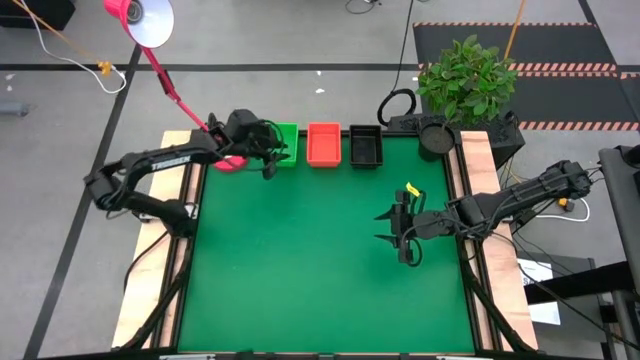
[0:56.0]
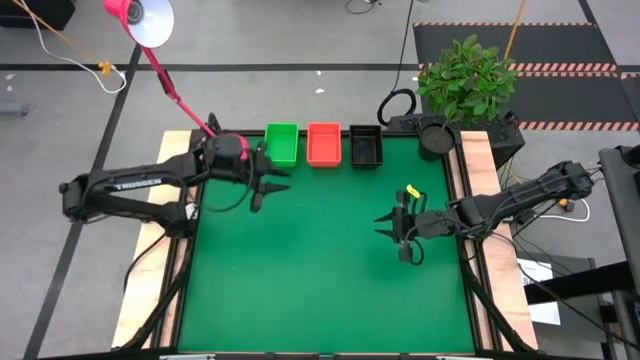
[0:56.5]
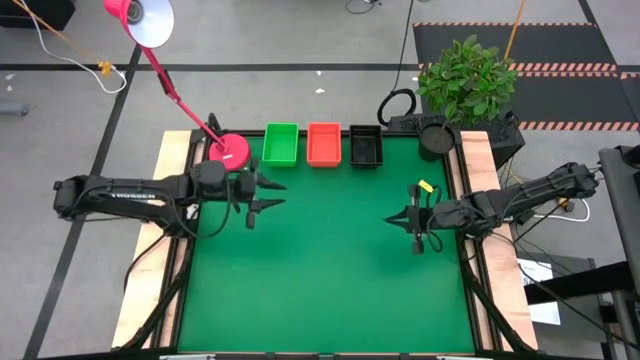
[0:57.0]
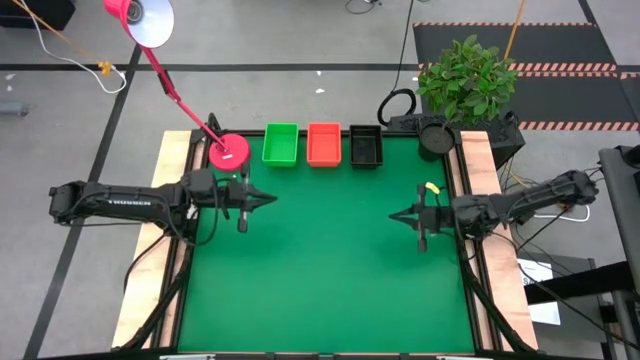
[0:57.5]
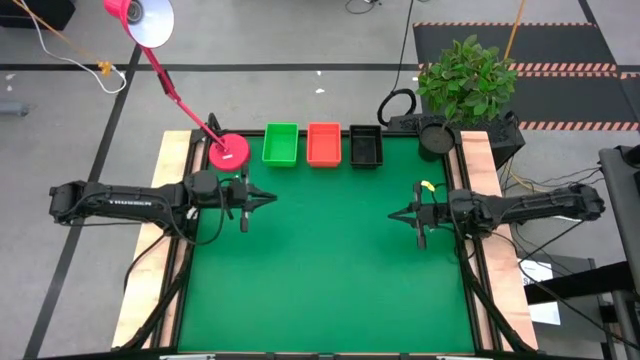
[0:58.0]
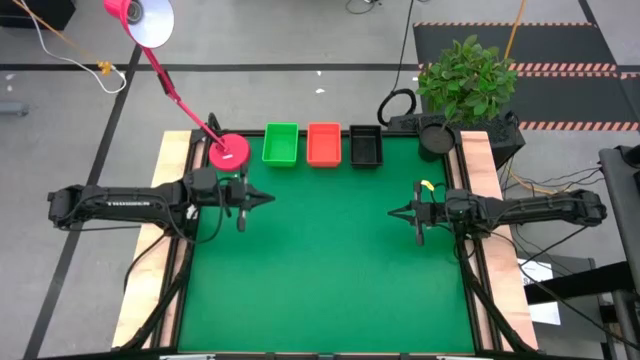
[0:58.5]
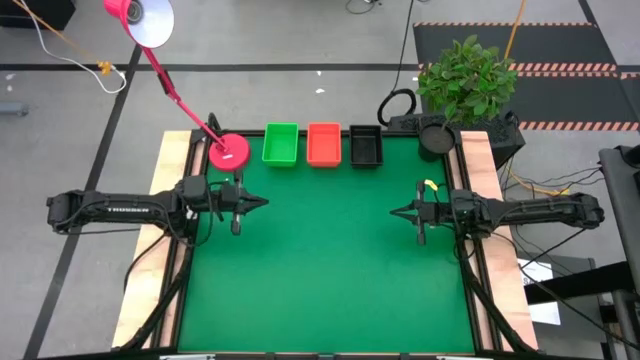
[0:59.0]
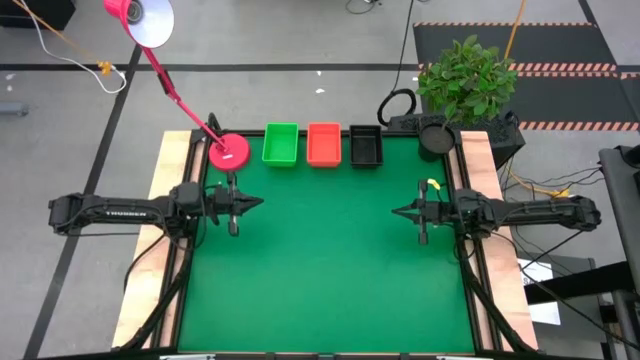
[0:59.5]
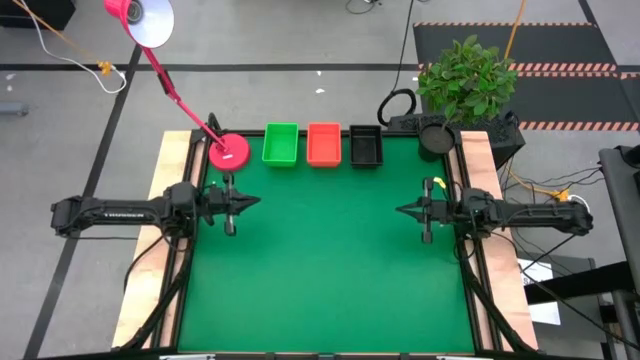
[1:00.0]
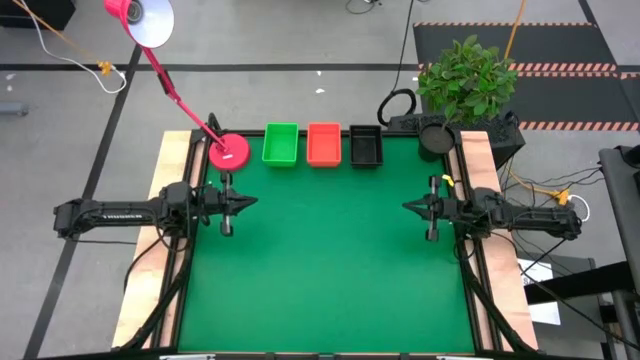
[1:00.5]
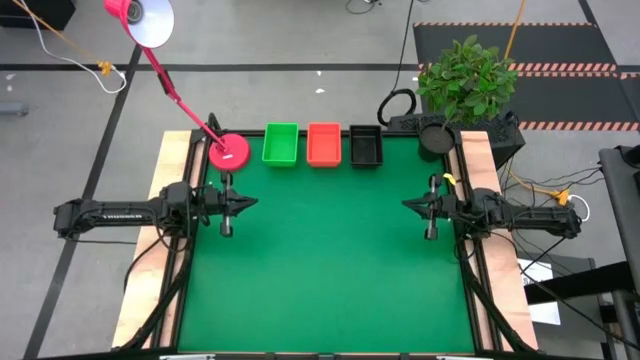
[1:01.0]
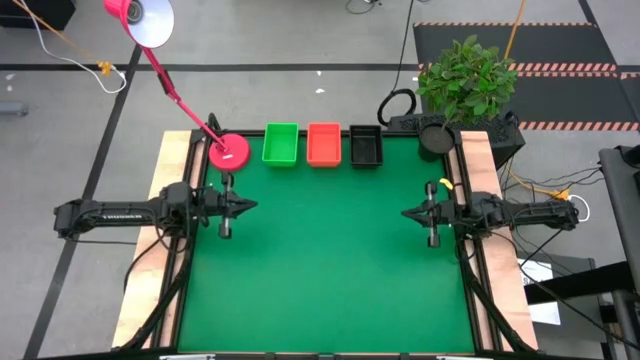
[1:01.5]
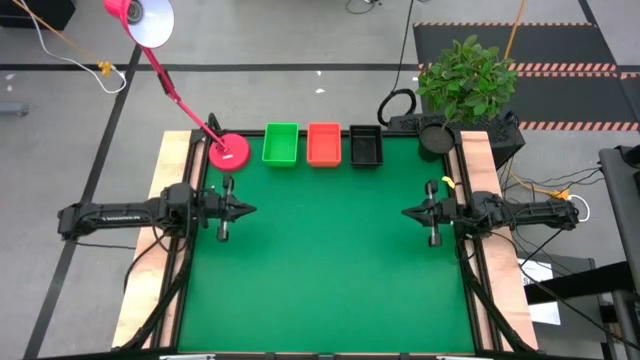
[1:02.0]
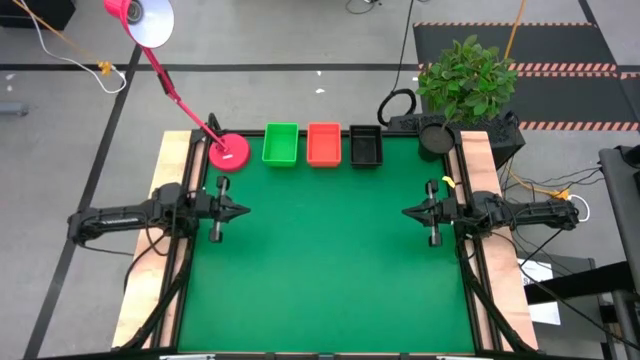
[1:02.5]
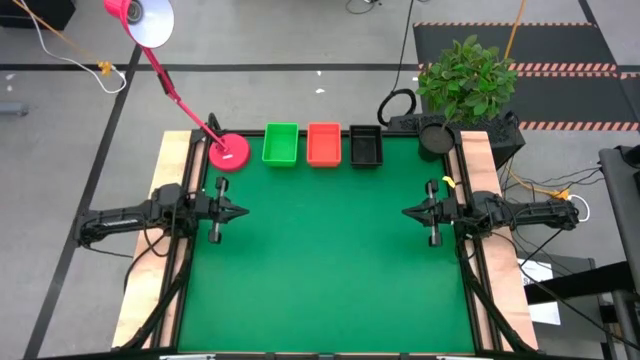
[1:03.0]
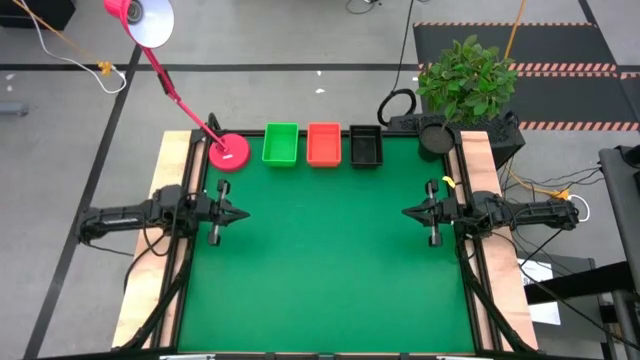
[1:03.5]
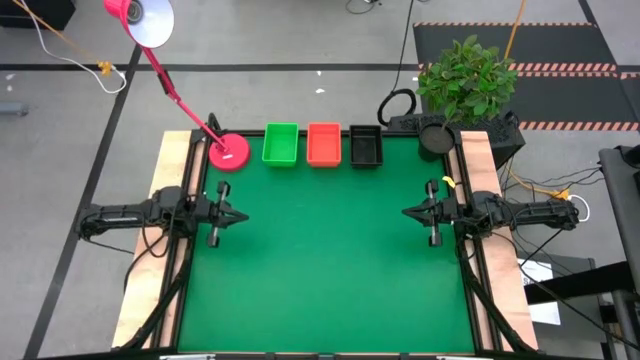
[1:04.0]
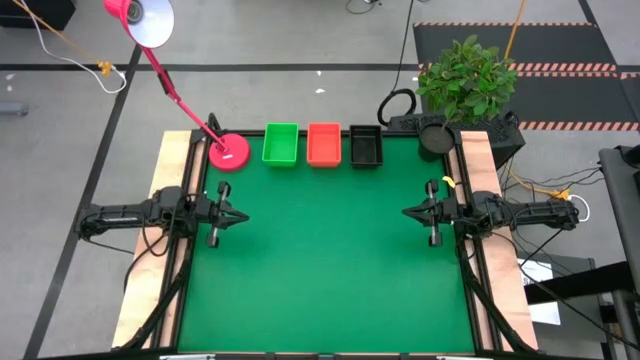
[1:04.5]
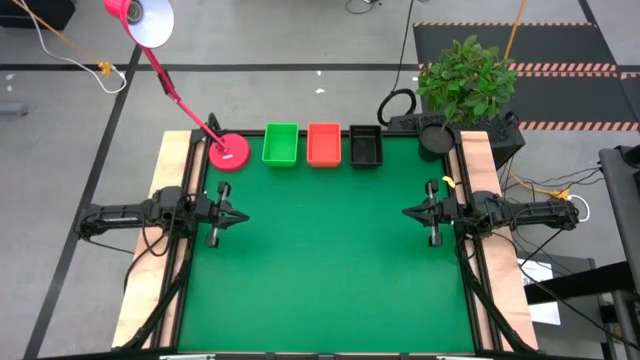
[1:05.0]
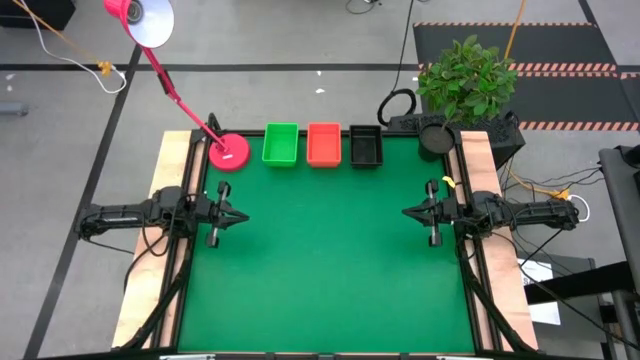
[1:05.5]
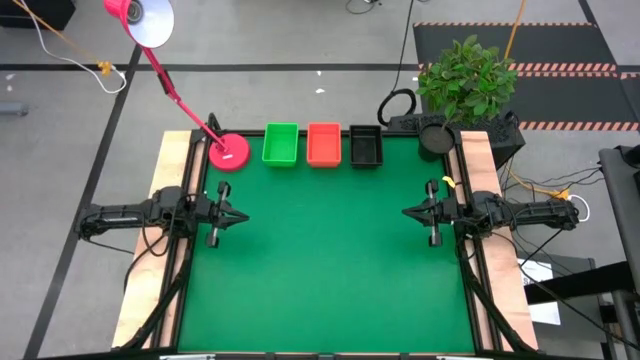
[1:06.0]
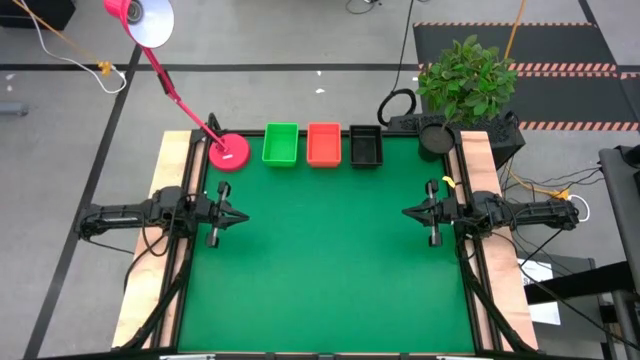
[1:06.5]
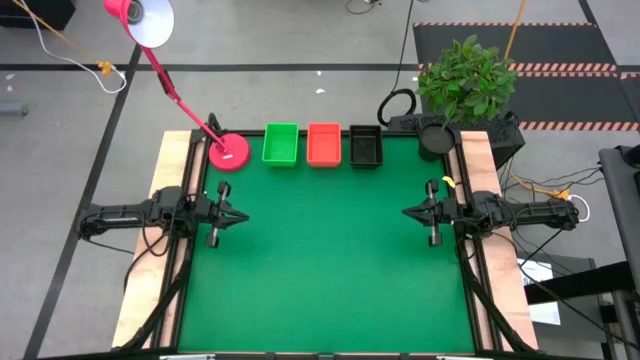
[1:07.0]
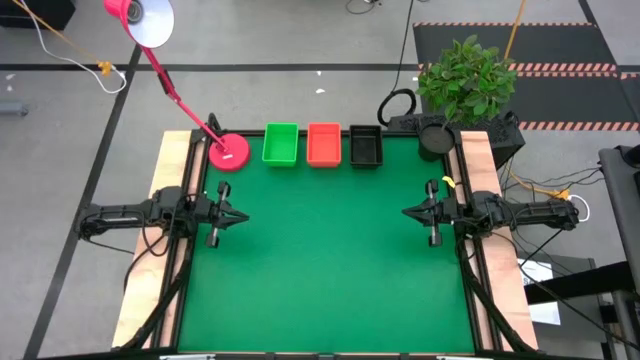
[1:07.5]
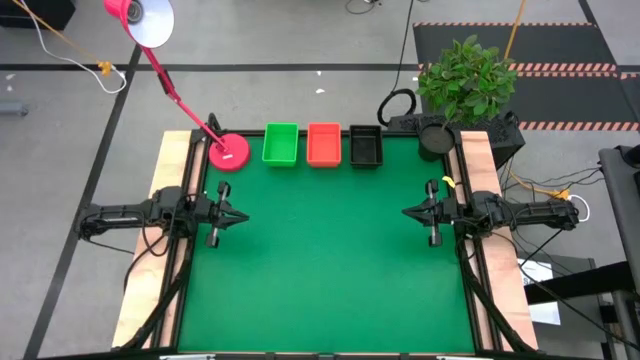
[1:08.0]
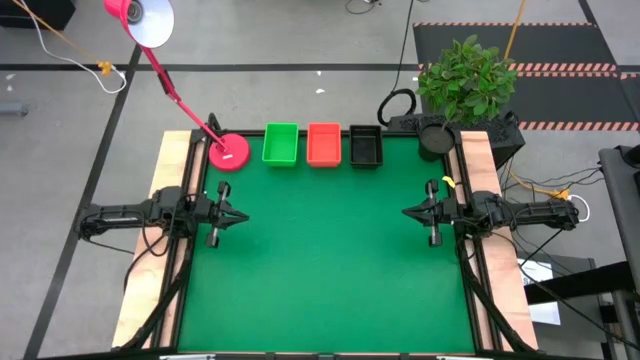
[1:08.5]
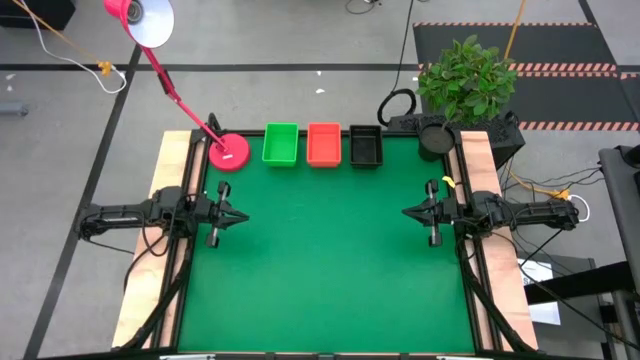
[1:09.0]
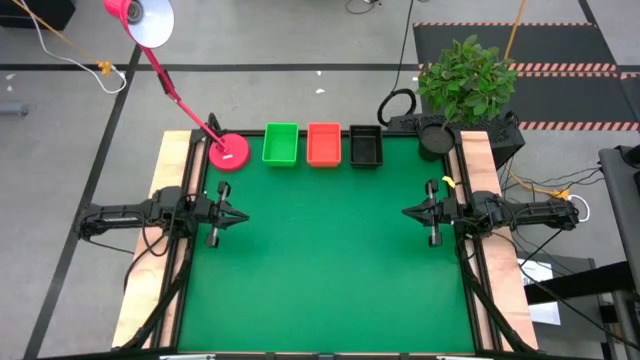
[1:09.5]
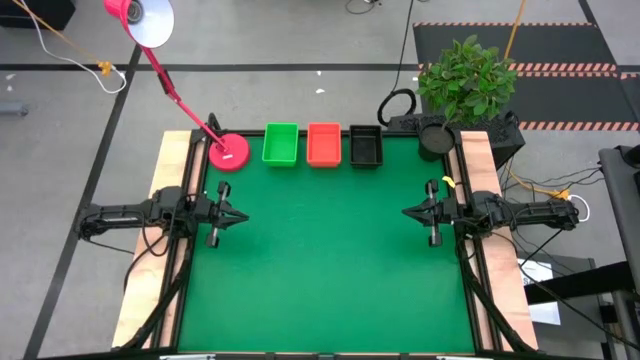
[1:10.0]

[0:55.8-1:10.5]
Return to Home position
